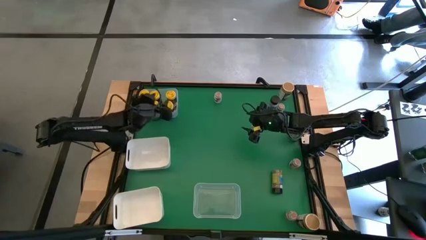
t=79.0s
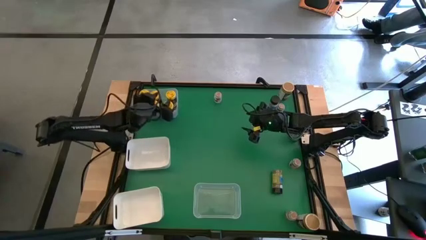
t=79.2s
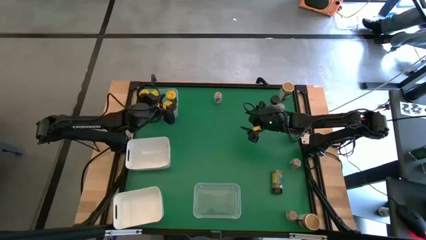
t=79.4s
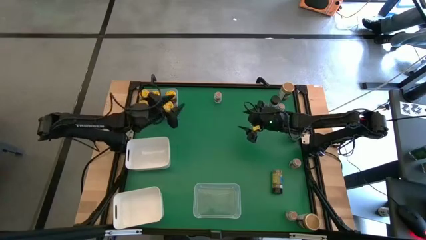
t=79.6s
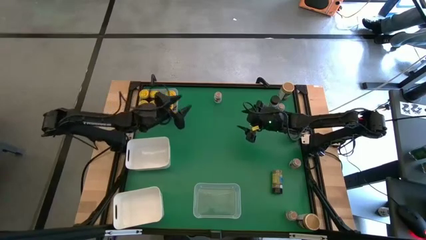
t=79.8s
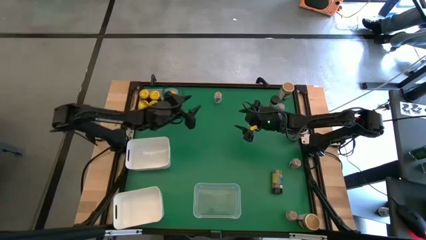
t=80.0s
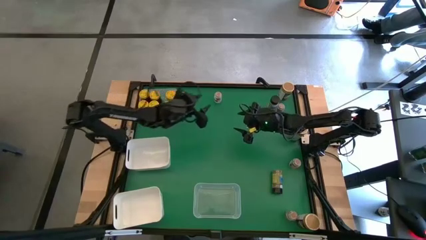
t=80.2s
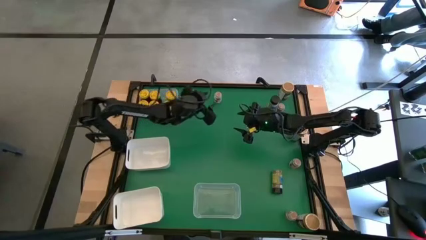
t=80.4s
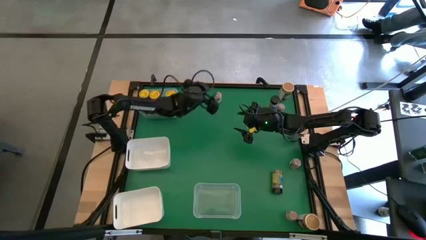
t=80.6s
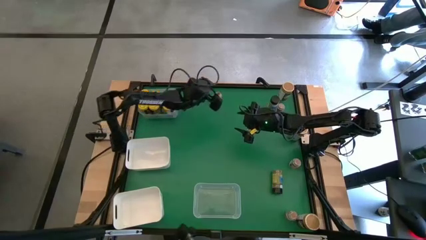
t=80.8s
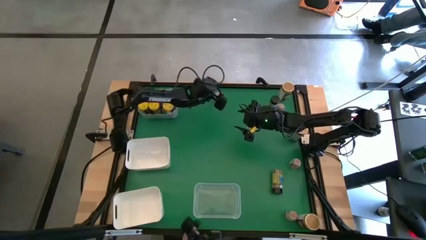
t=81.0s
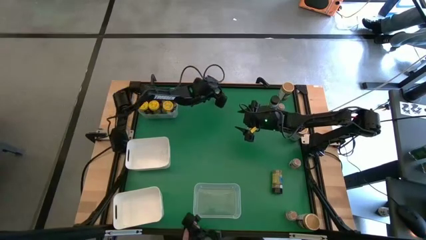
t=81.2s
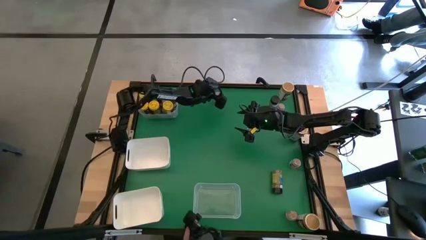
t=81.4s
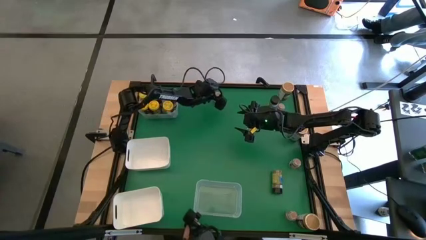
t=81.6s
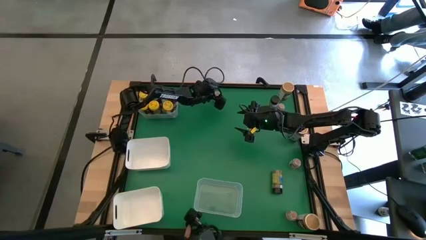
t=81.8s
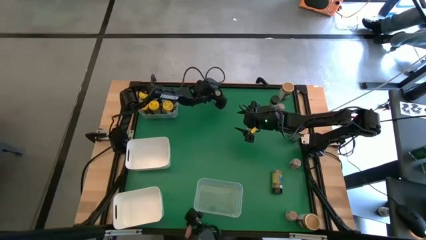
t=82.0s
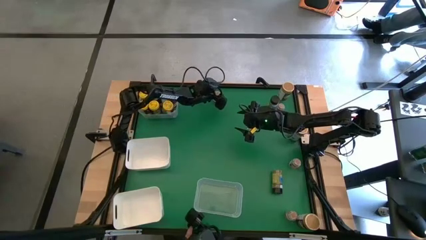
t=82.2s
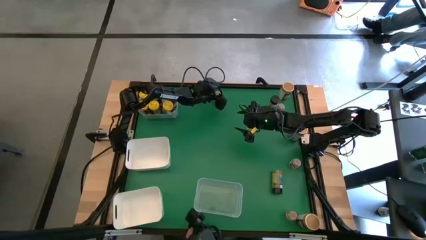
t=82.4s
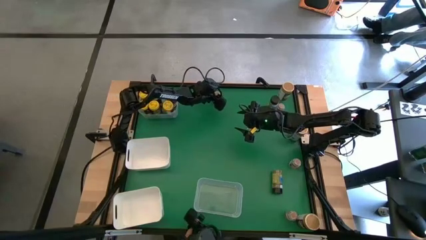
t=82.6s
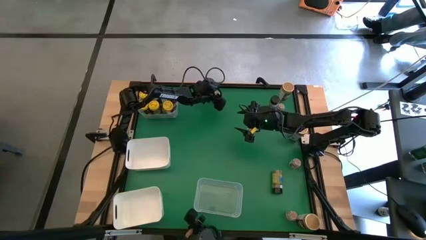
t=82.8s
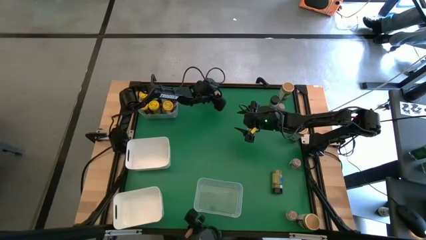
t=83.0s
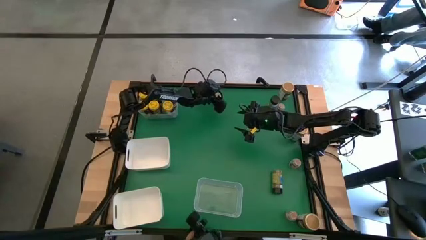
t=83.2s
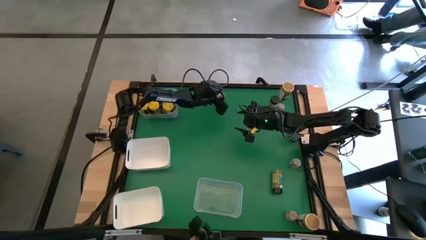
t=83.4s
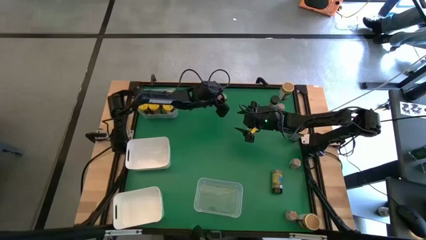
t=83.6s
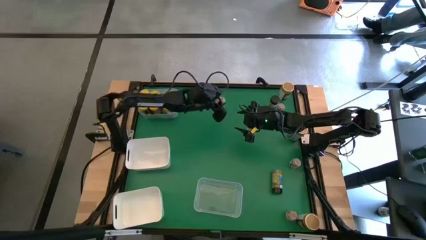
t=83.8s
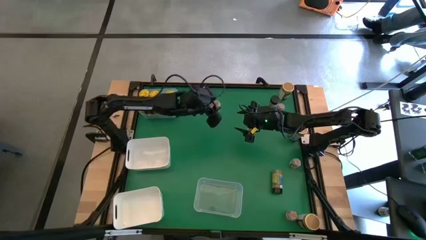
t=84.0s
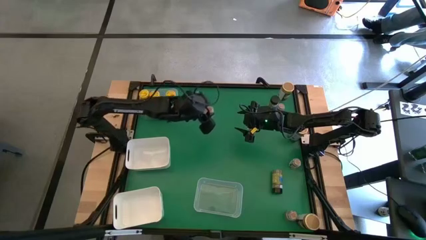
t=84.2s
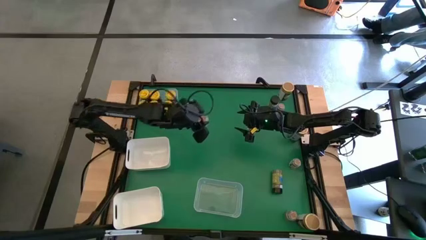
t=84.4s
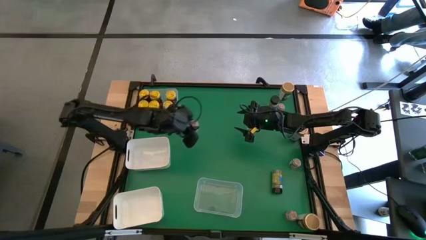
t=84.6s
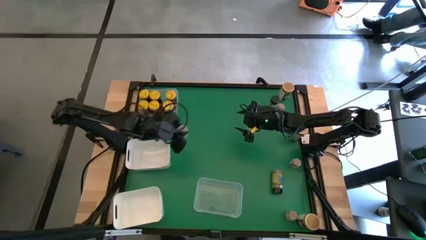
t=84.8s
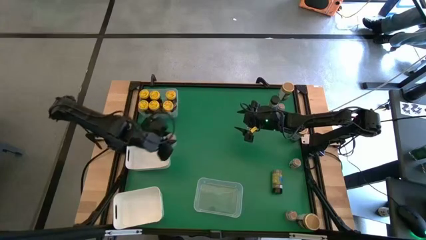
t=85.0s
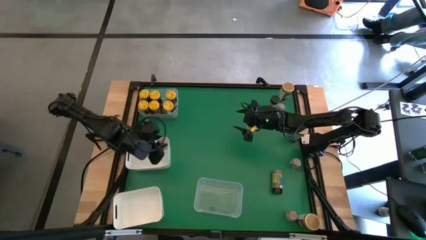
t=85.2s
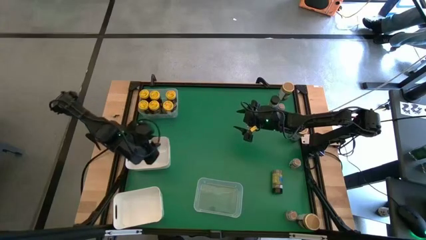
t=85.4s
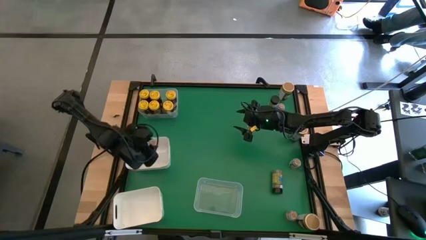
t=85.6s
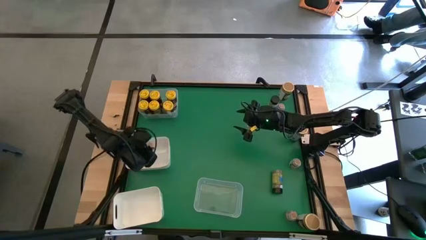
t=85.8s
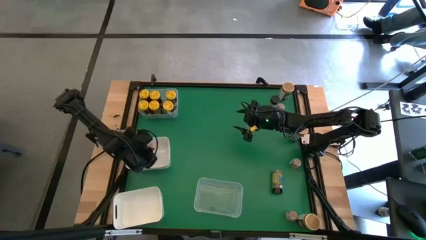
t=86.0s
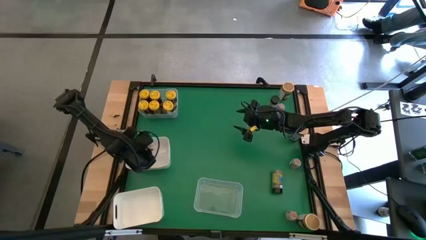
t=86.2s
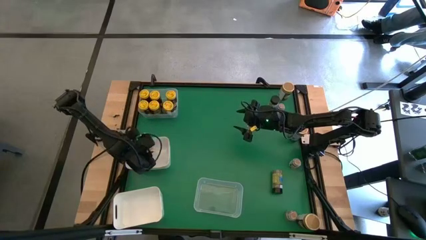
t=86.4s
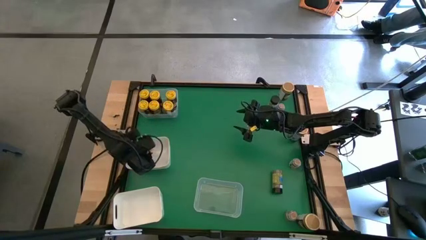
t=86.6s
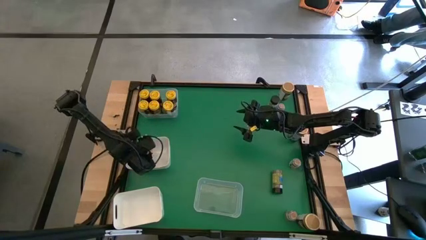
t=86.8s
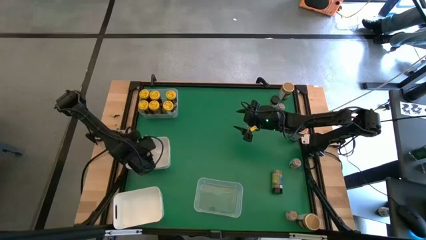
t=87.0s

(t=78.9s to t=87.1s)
Task: Sort spices by type
Put the brown spice bottle into the top white bin

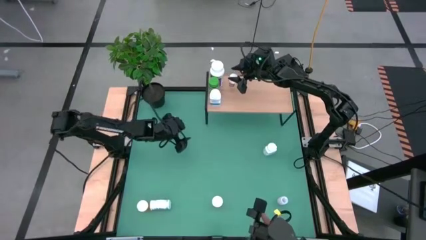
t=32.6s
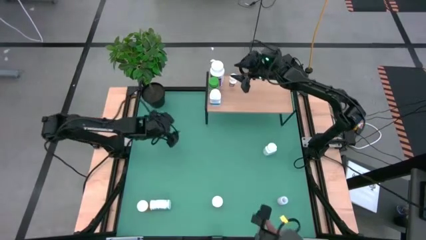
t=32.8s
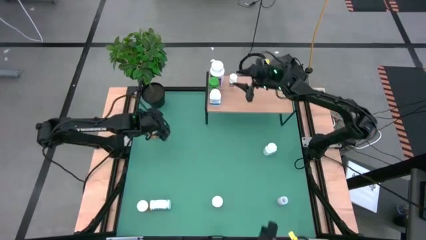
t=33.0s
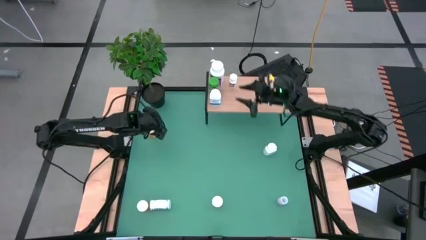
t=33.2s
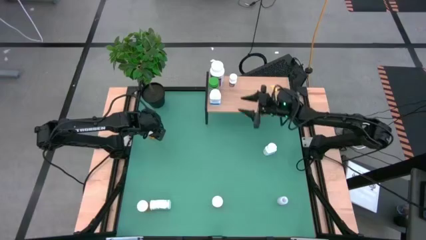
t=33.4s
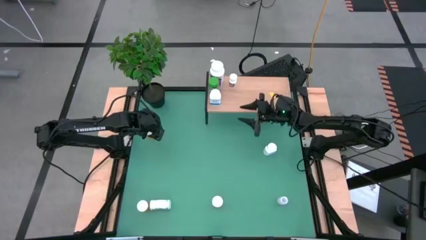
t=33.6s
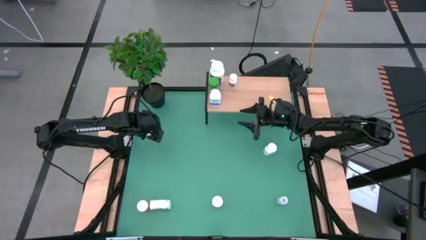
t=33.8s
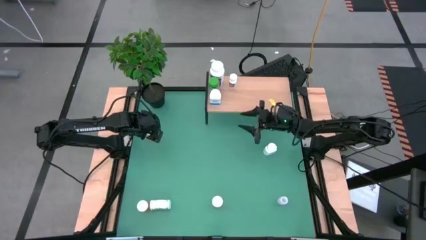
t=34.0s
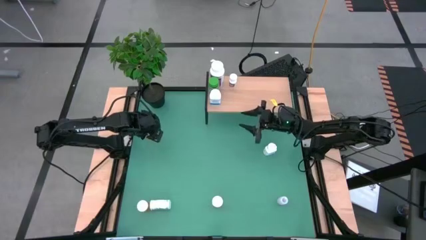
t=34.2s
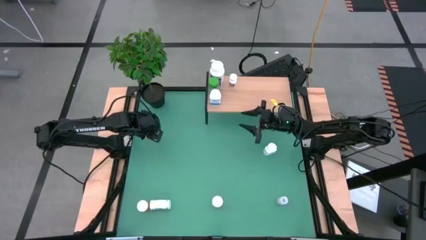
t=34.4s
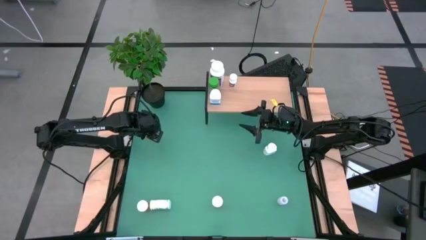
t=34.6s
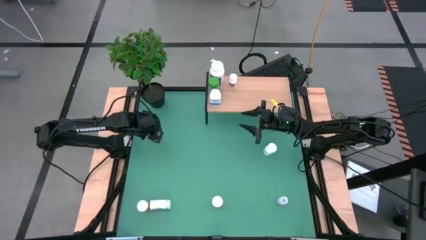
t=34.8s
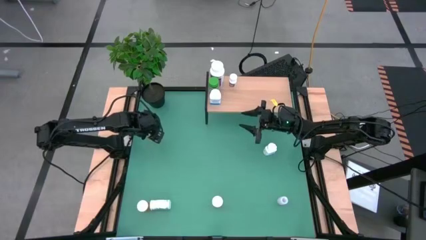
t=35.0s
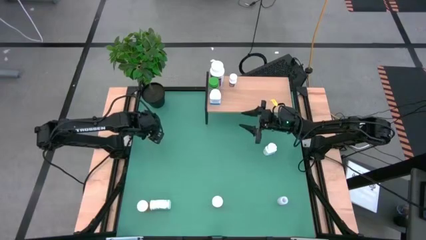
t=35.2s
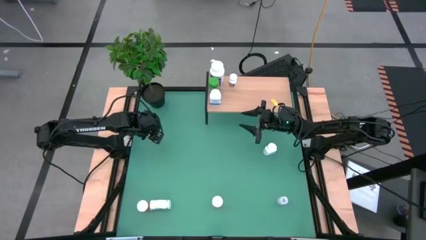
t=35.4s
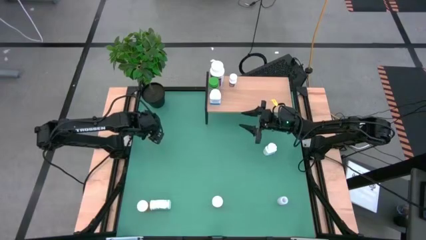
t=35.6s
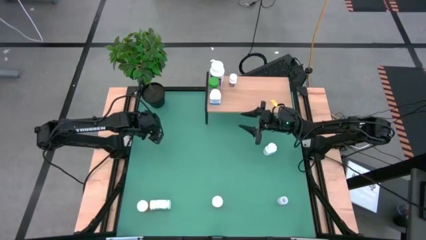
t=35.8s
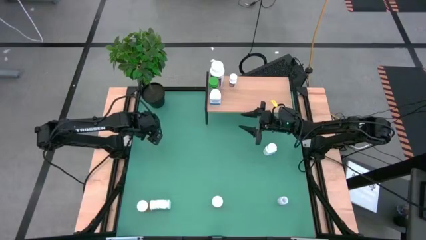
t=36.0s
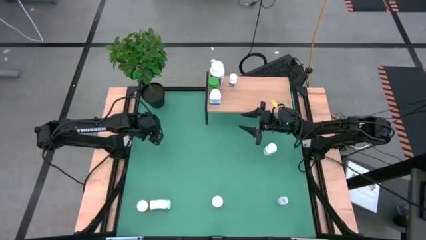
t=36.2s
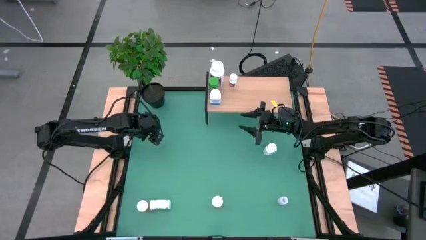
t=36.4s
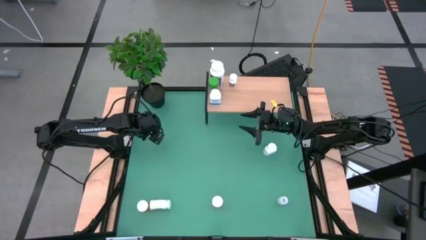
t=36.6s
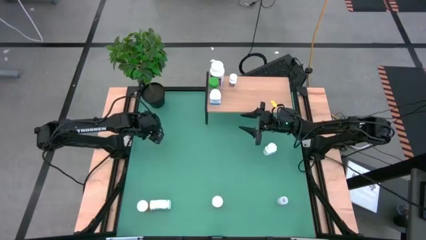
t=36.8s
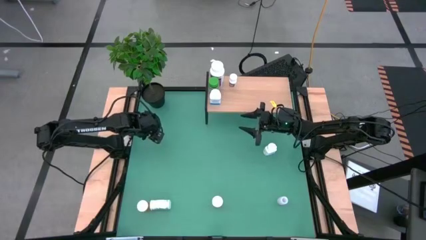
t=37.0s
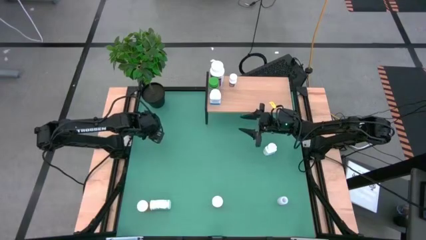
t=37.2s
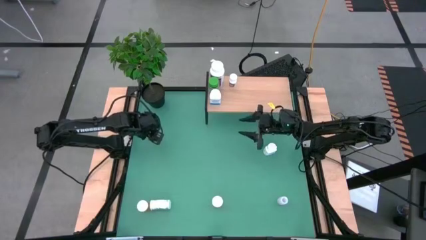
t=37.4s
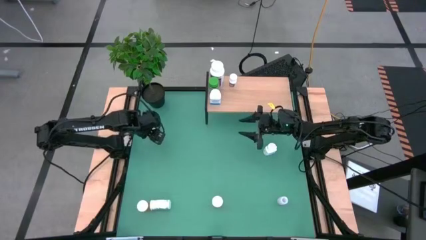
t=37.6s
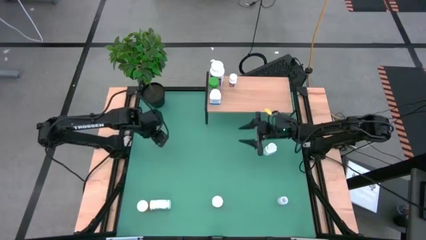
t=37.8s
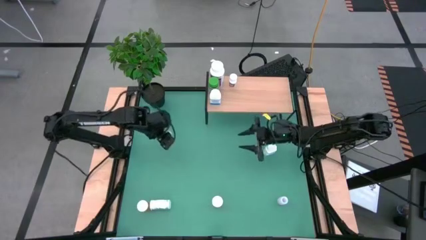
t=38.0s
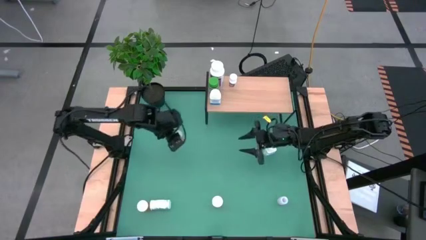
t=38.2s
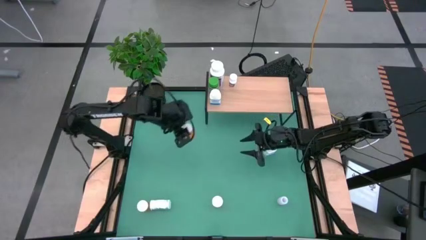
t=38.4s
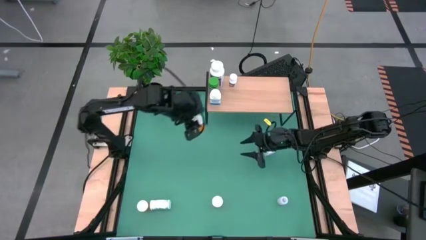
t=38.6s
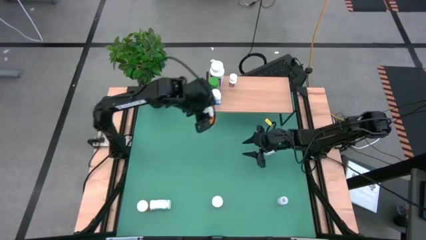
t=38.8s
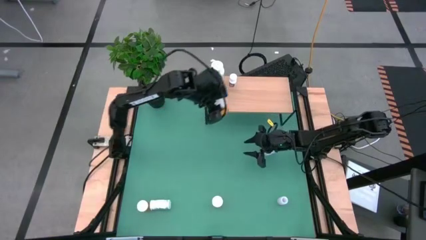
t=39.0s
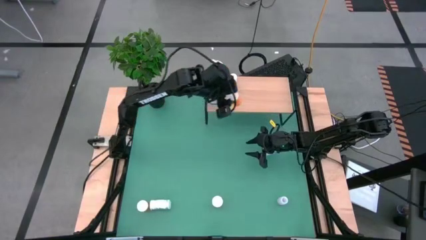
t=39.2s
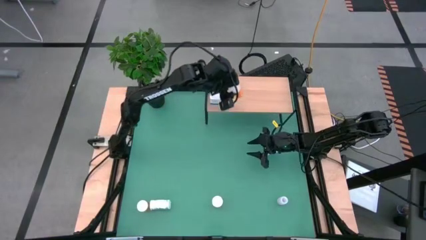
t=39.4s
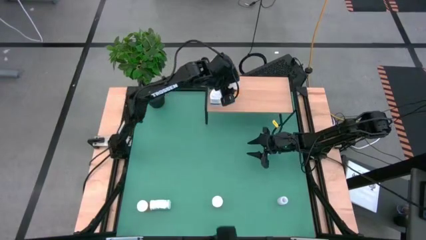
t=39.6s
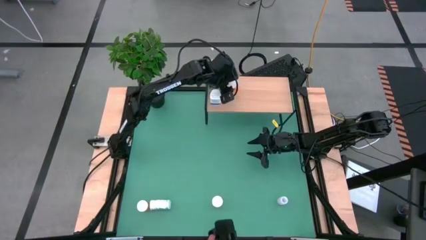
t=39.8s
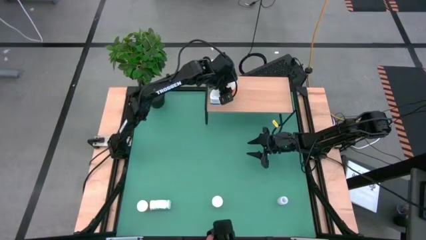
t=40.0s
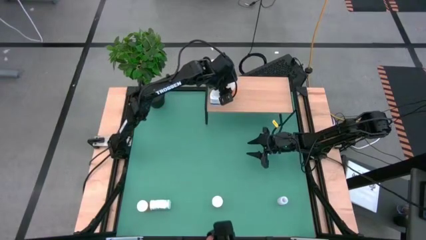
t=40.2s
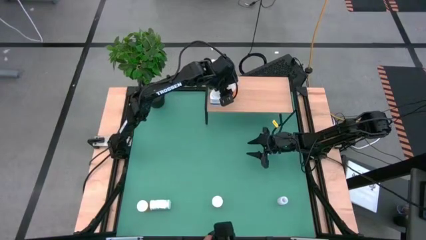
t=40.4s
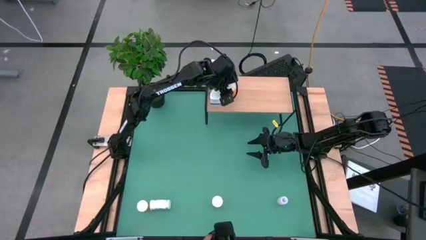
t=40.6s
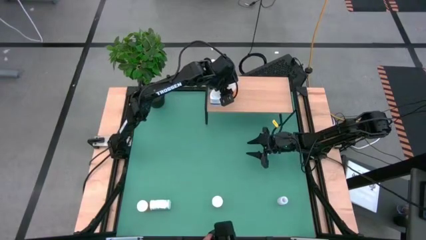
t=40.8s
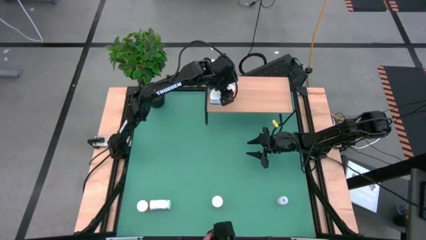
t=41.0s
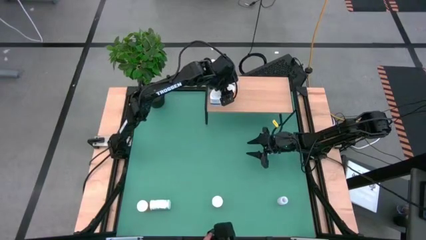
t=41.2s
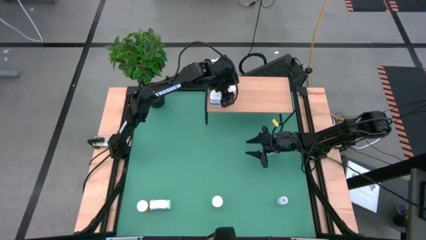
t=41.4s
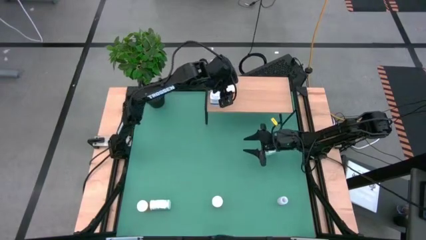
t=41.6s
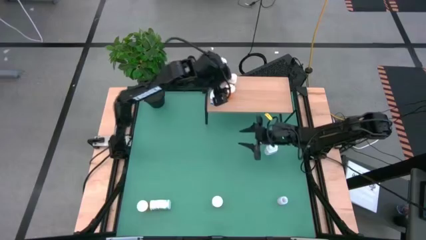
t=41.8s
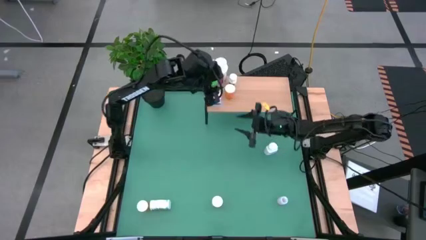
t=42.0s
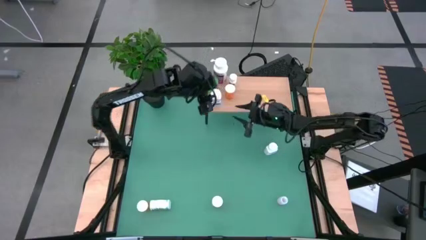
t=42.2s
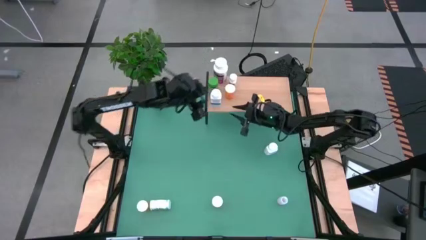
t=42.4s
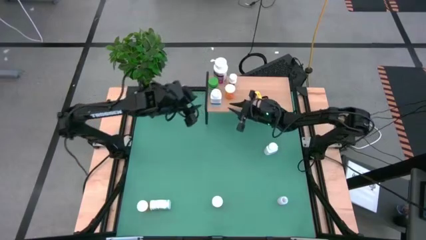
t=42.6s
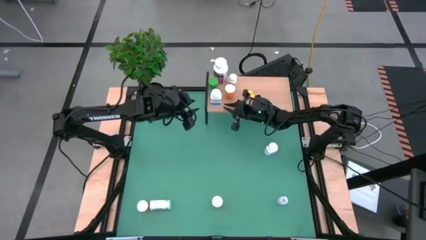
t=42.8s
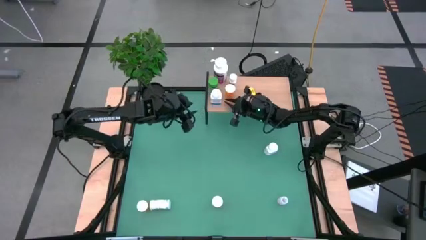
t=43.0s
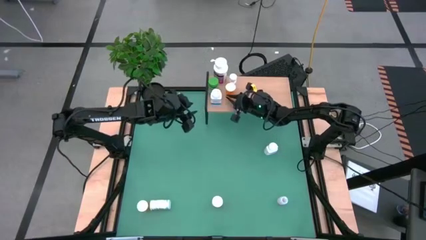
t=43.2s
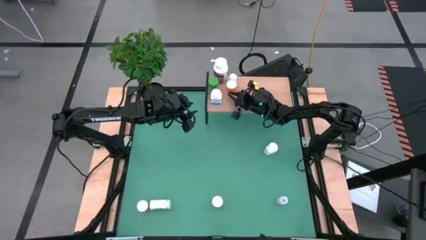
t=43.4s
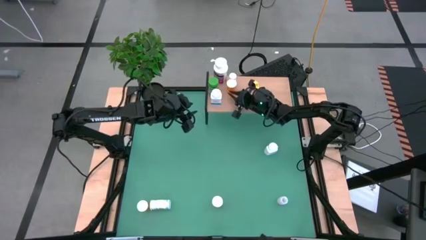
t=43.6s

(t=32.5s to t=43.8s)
Task: Pick and place medicine bottles onto shelf by color
Put the top orange medicine bottle on the shelf
